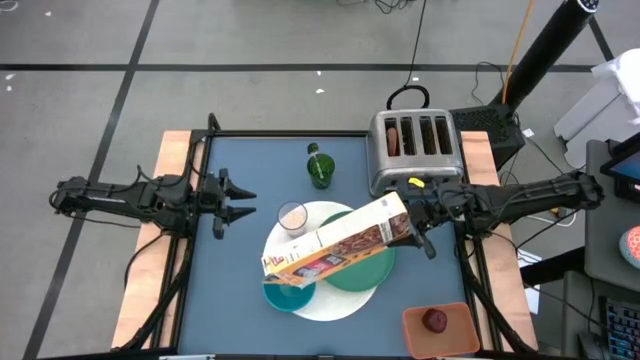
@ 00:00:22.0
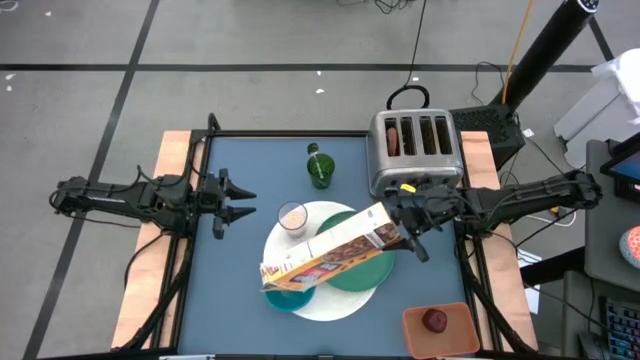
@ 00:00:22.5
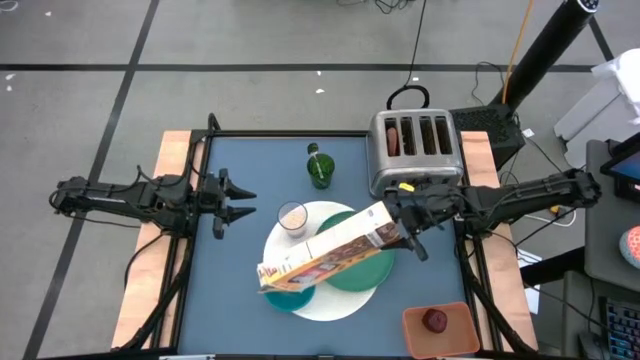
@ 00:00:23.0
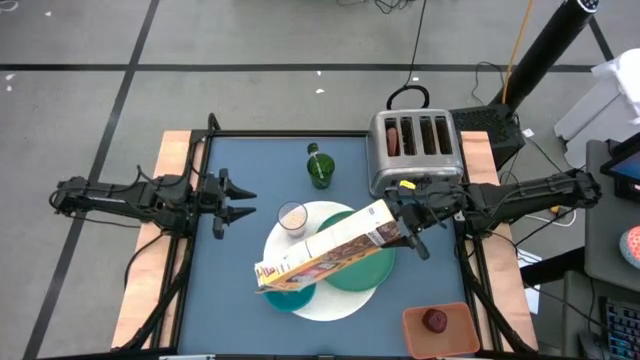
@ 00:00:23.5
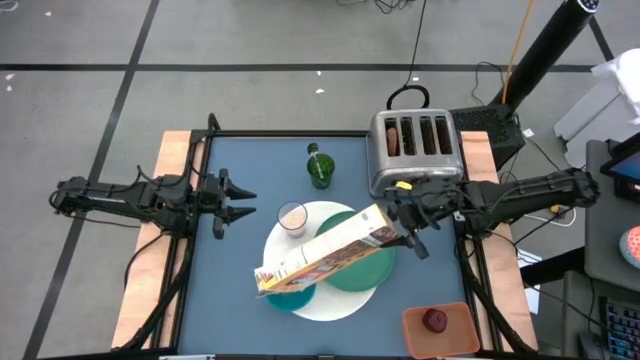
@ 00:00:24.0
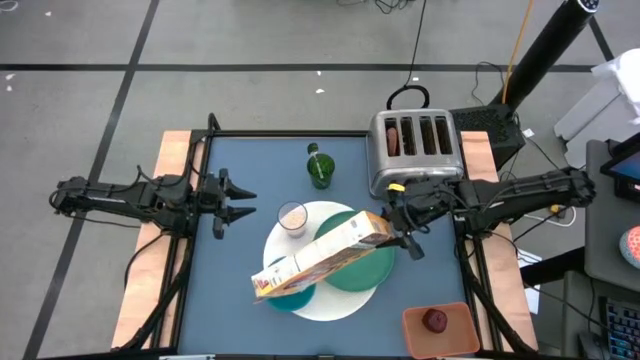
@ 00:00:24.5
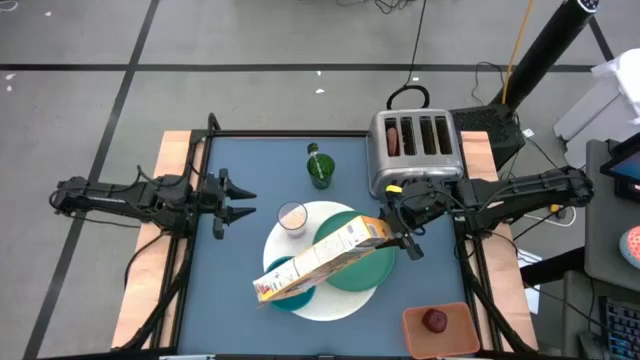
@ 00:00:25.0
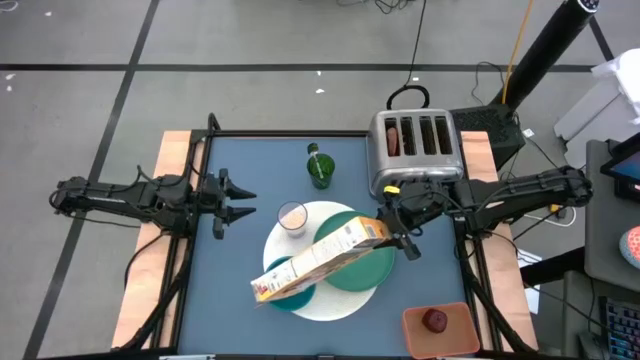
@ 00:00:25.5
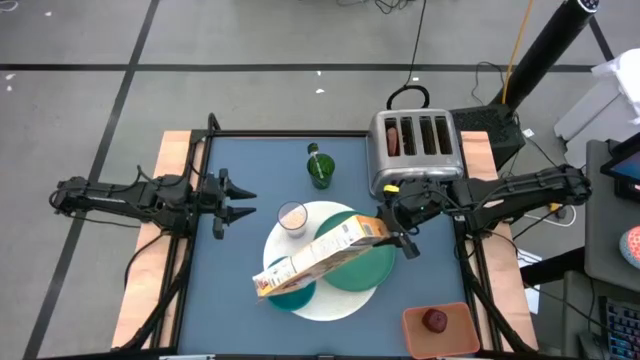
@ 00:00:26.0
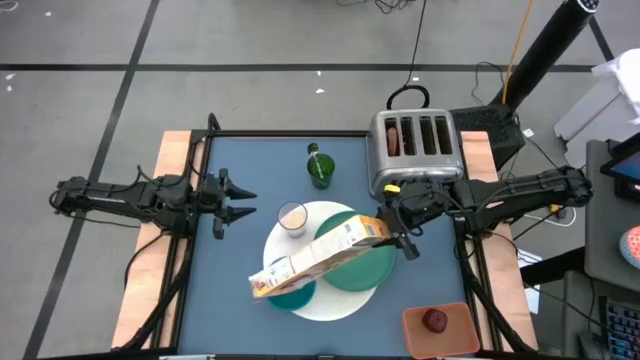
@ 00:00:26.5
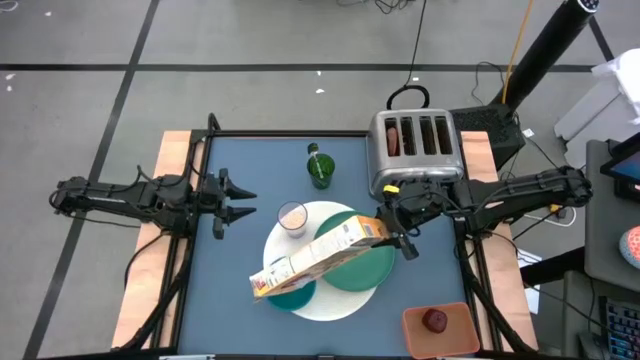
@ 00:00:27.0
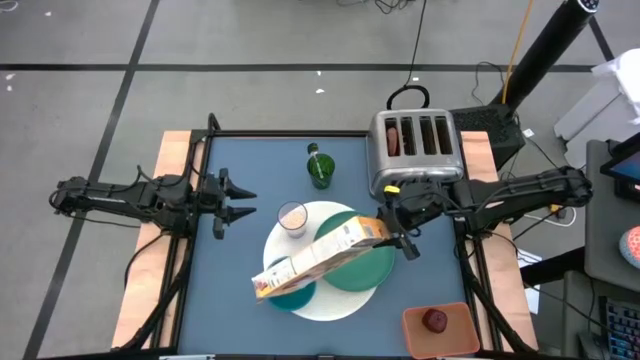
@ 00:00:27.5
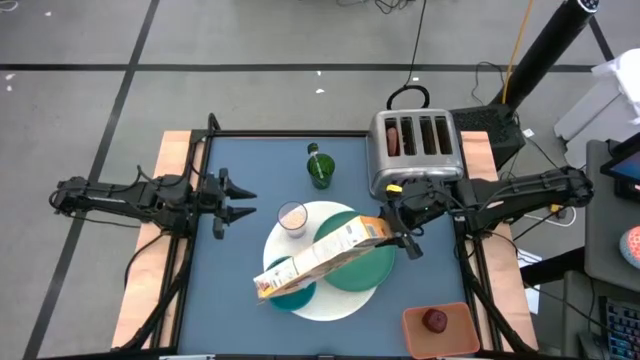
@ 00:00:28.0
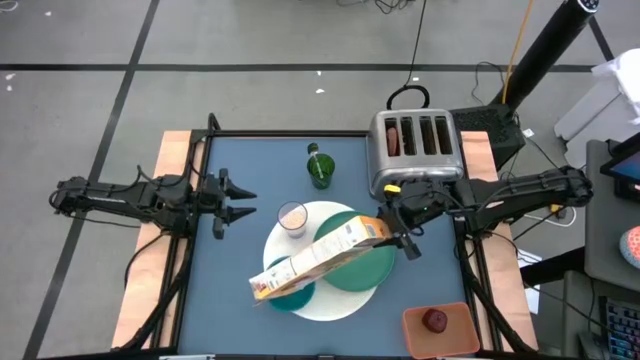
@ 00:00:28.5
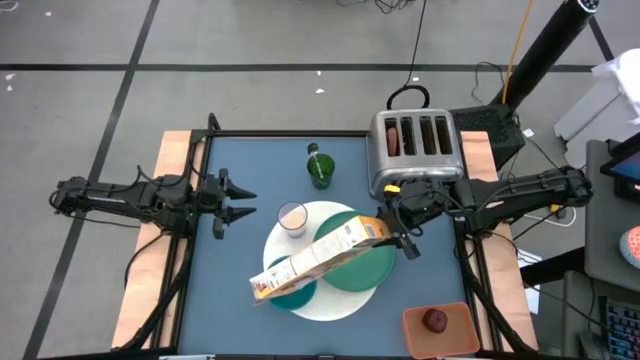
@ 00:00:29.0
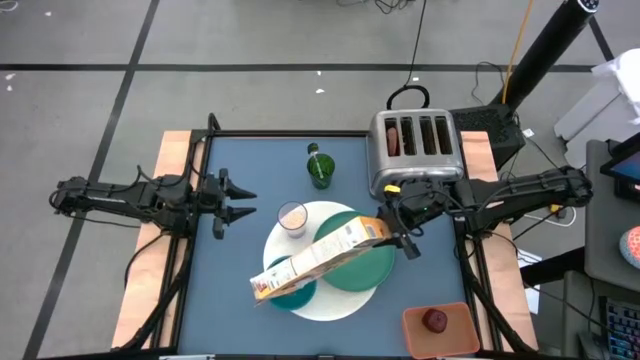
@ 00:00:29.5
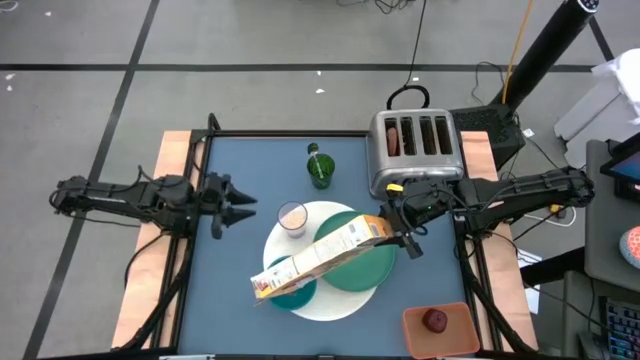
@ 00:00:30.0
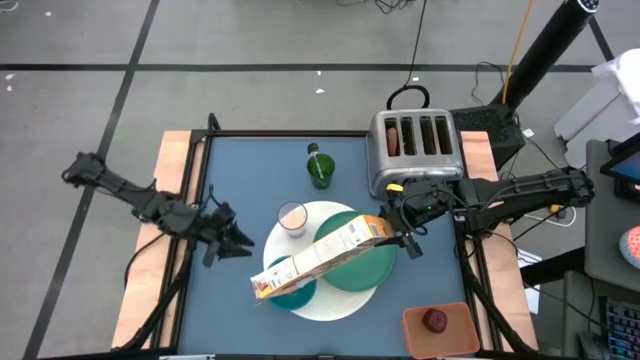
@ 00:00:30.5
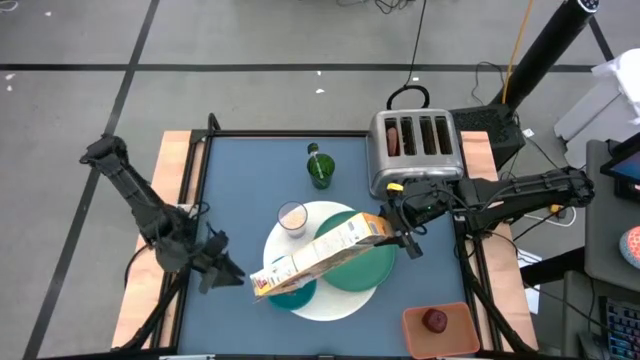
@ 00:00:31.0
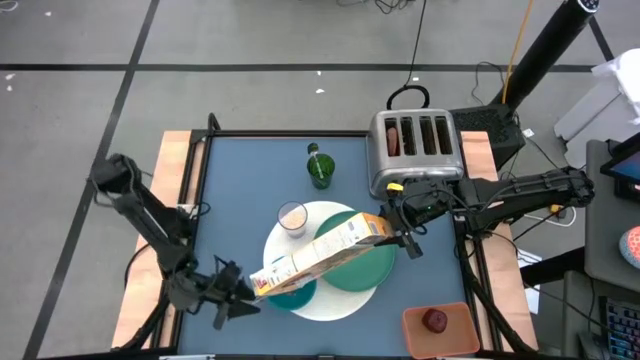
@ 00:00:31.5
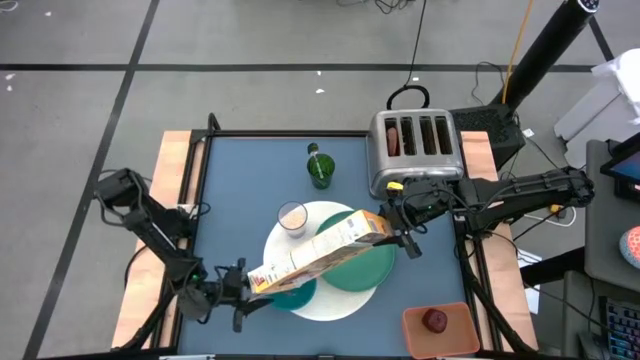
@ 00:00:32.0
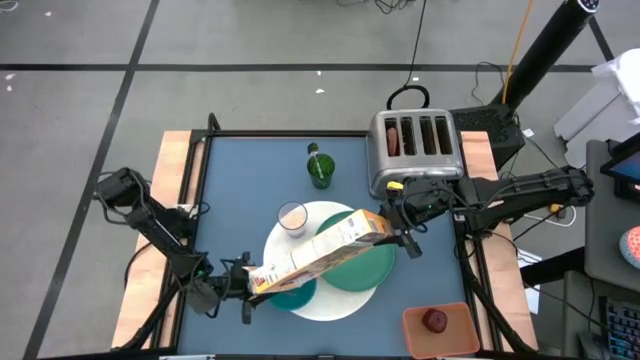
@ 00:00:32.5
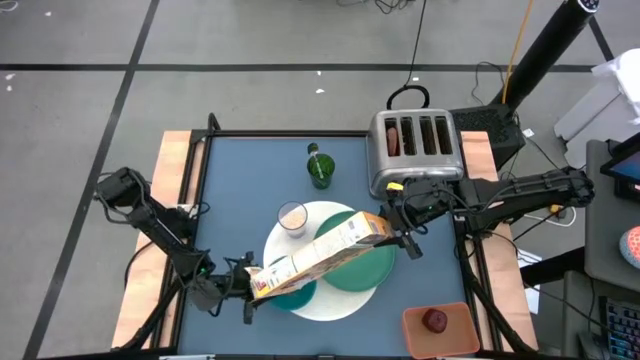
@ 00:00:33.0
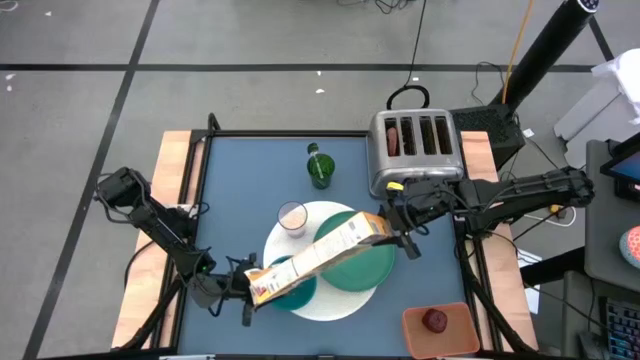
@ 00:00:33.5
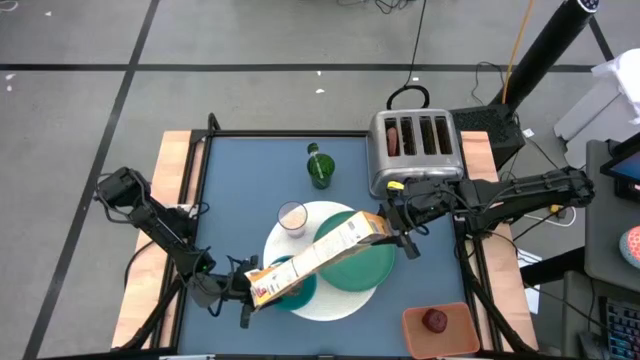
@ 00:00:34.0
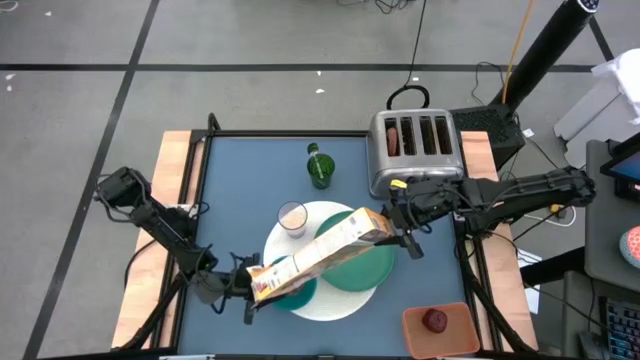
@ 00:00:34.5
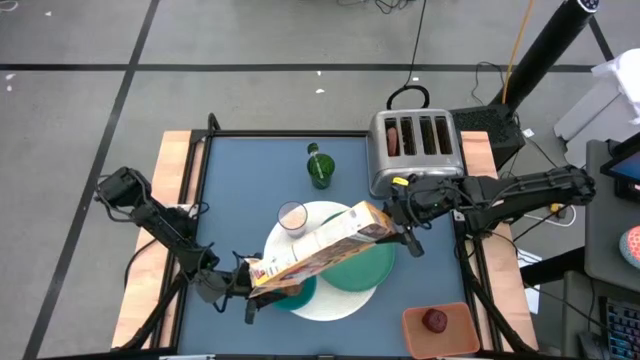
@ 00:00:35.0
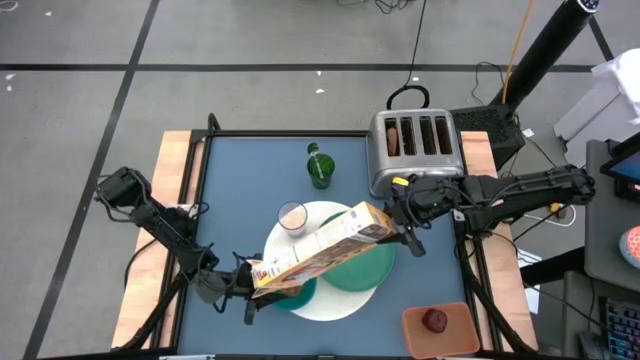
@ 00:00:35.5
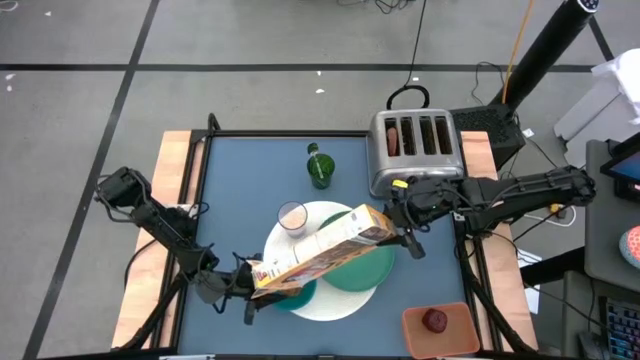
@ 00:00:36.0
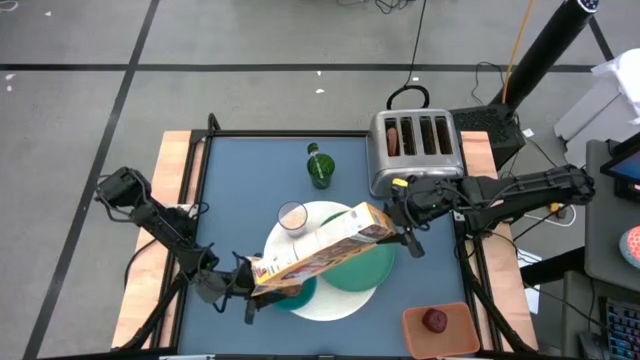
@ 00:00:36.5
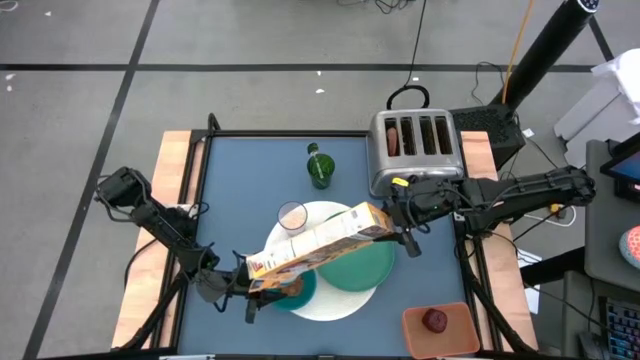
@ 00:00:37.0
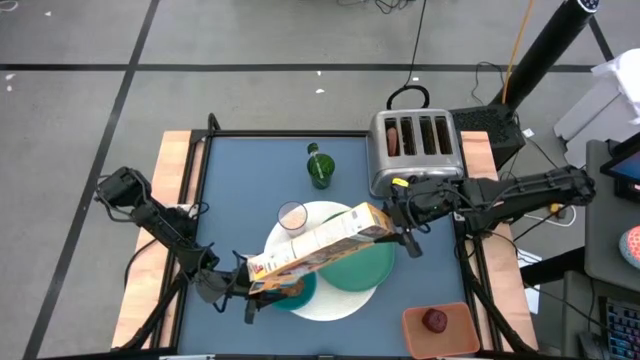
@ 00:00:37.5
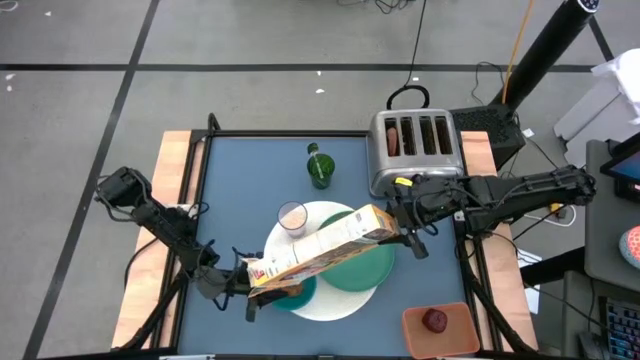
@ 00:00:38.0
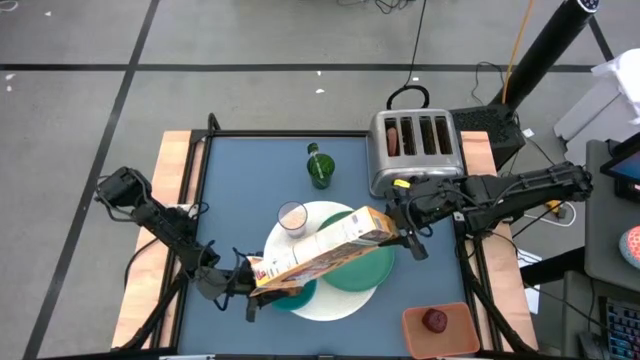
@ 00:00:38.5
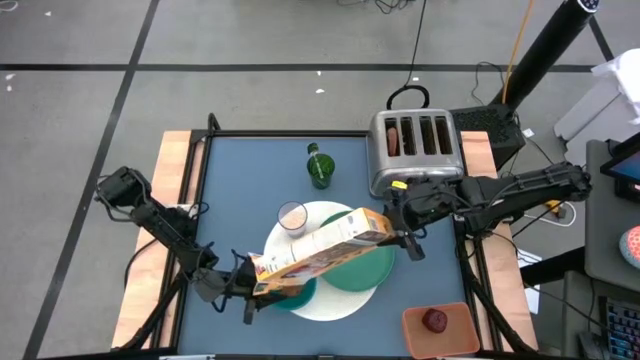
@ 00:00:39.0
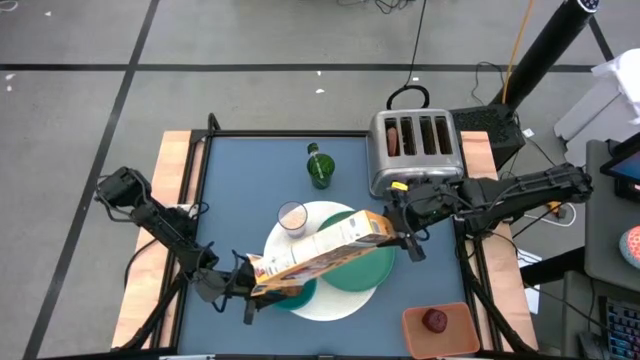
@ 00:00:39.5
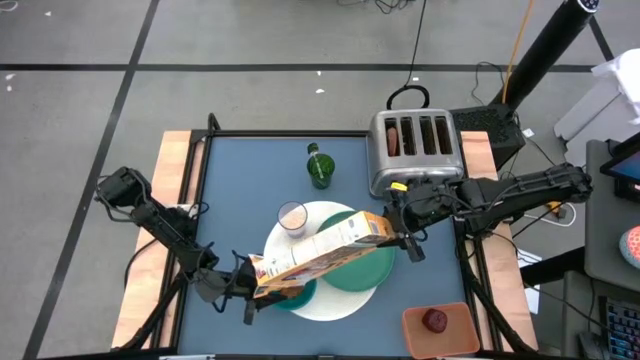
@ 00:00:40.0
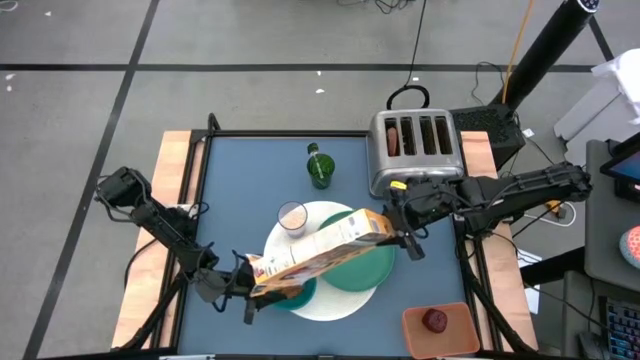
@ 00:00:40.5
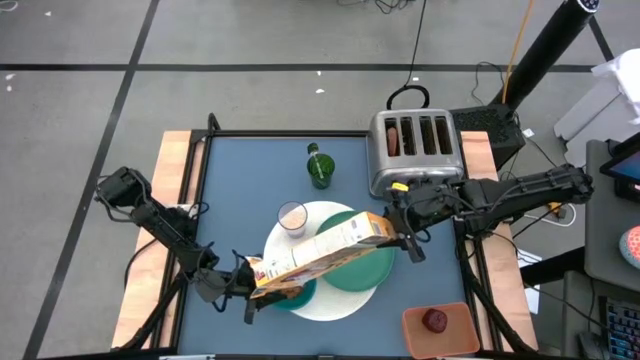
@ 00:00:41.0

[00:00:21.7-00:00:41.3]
Task: Arrange a breakfast setting
Pour the cereal from the cereal box into the blue bowl
